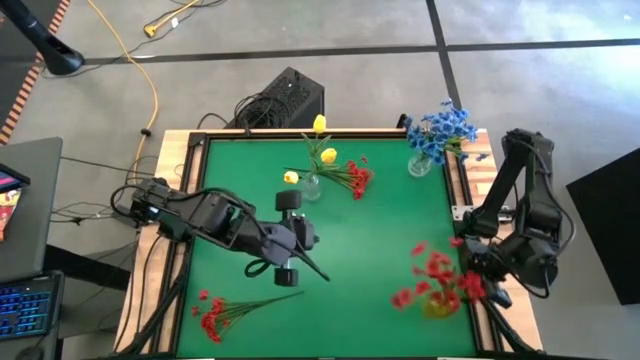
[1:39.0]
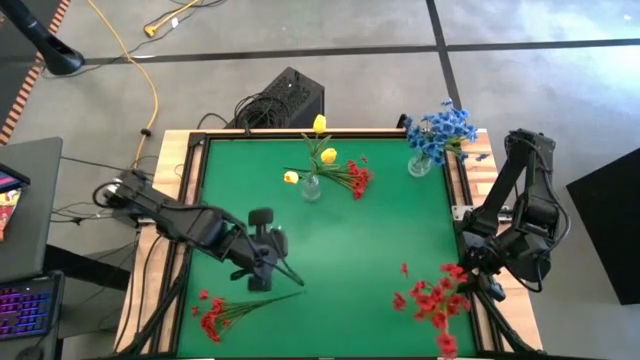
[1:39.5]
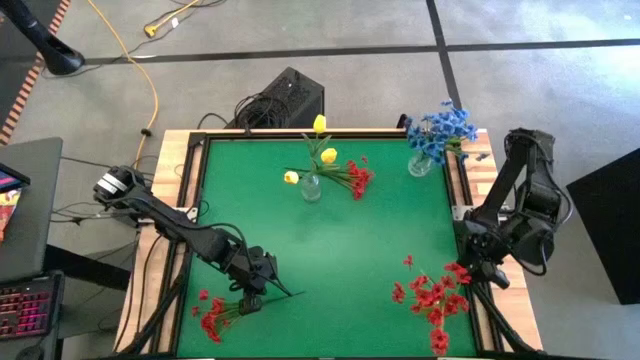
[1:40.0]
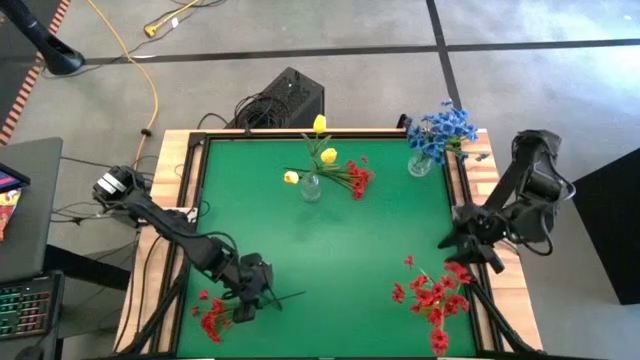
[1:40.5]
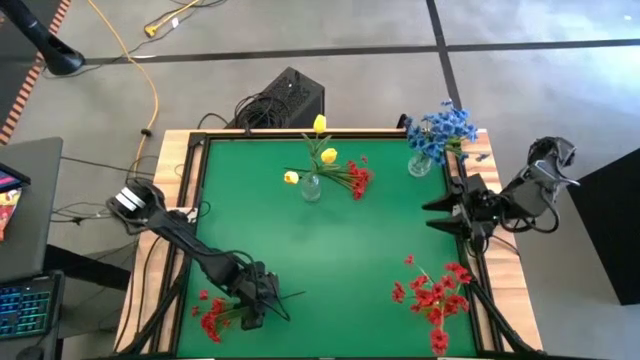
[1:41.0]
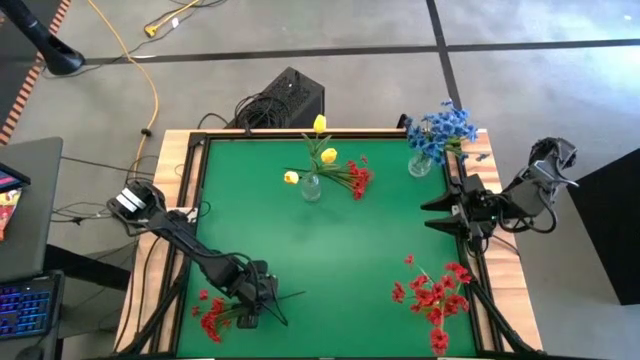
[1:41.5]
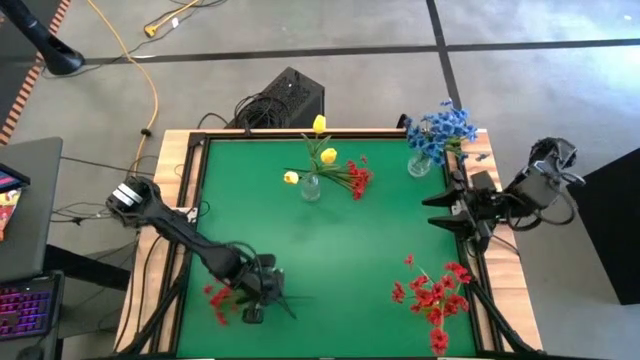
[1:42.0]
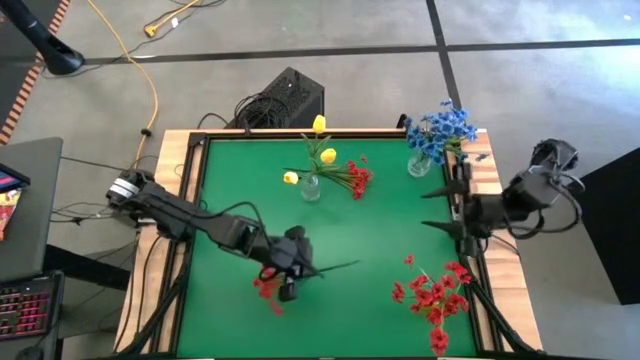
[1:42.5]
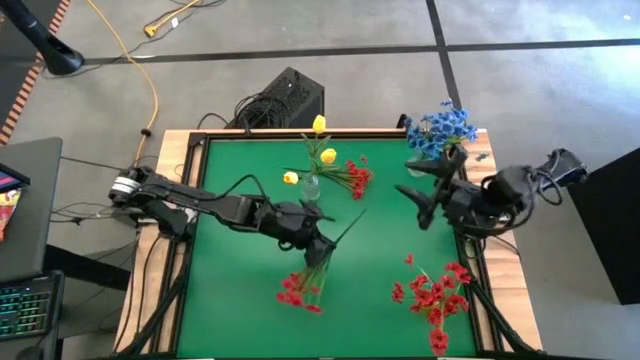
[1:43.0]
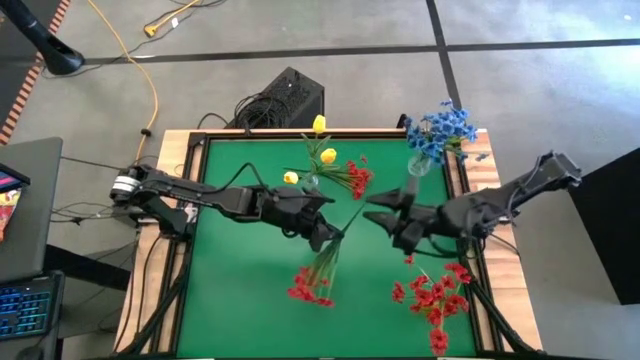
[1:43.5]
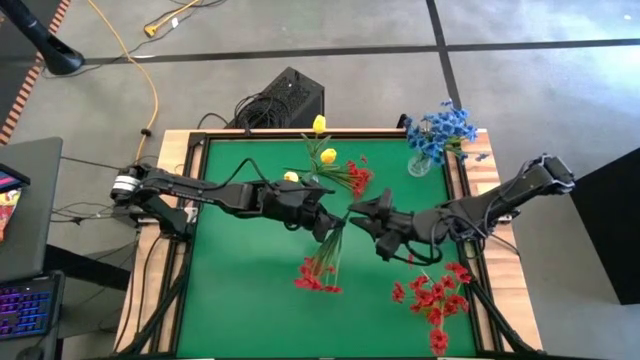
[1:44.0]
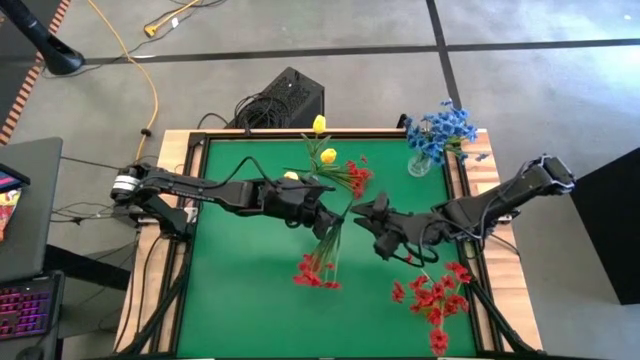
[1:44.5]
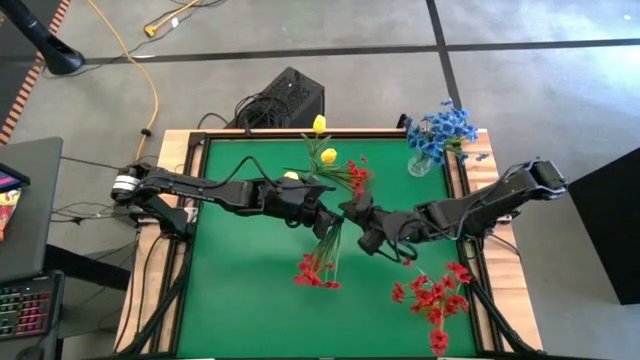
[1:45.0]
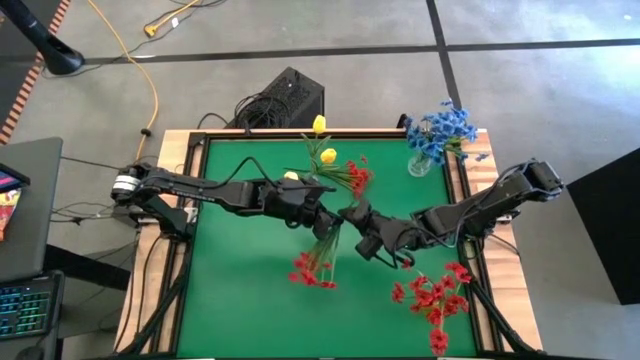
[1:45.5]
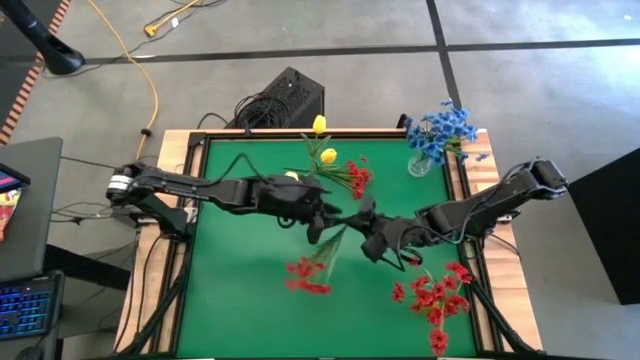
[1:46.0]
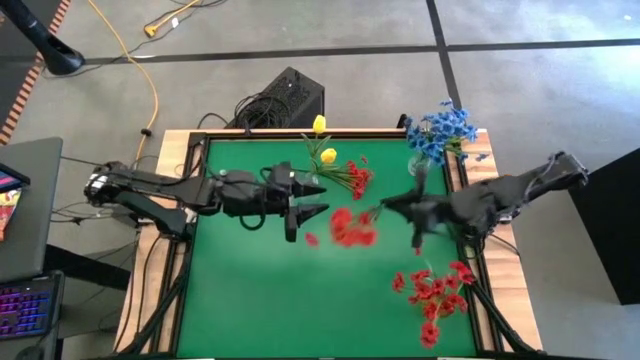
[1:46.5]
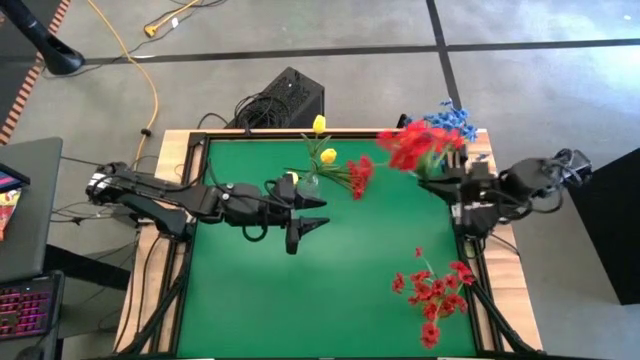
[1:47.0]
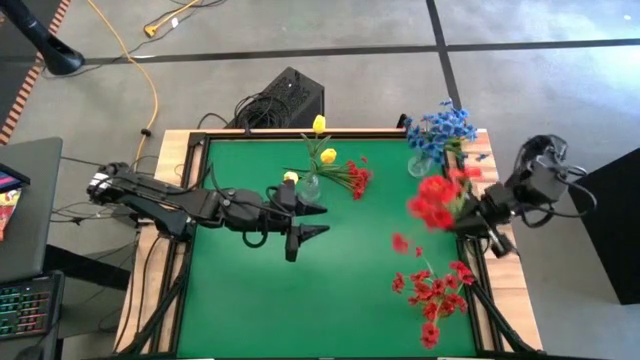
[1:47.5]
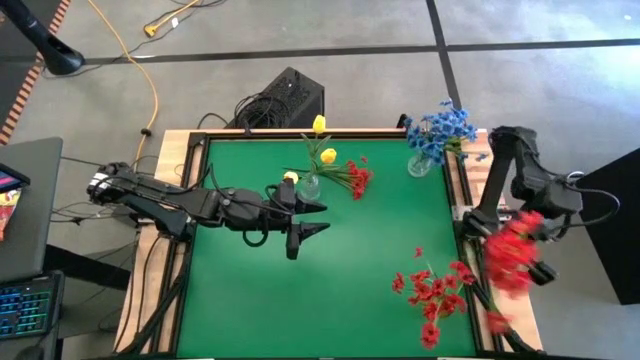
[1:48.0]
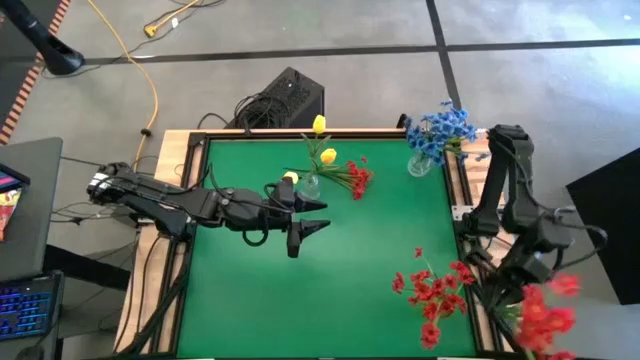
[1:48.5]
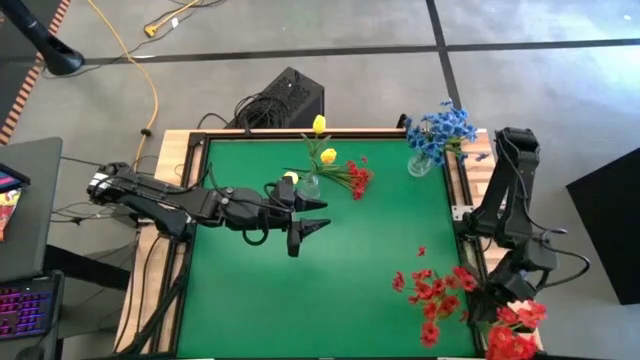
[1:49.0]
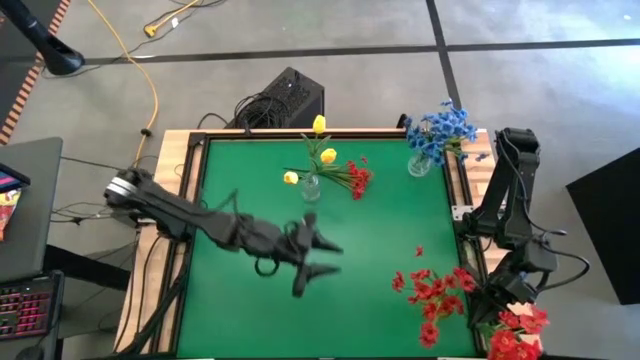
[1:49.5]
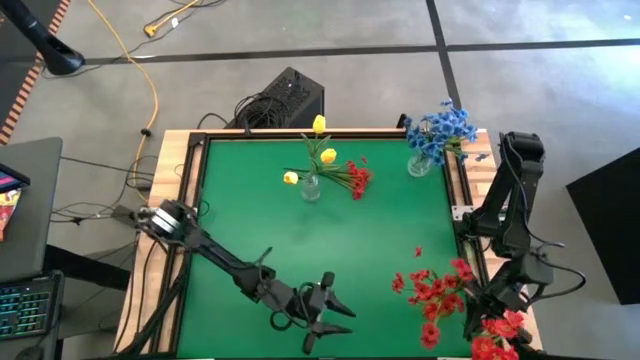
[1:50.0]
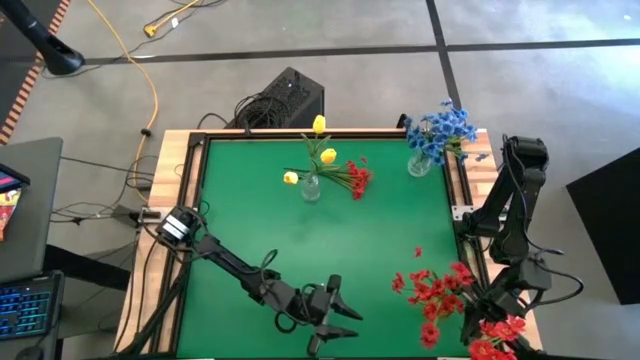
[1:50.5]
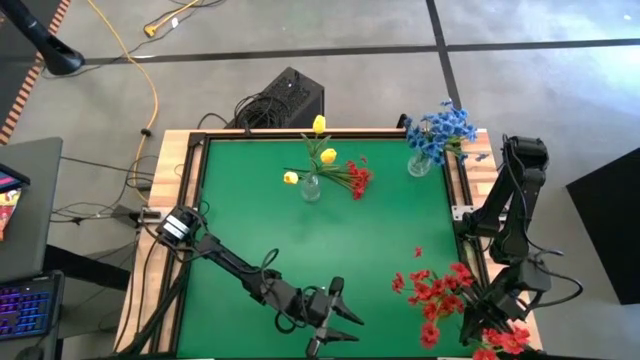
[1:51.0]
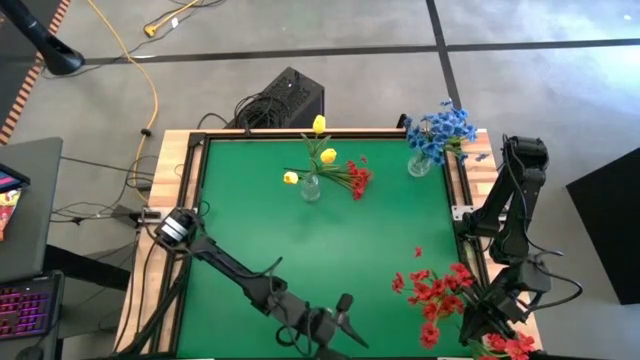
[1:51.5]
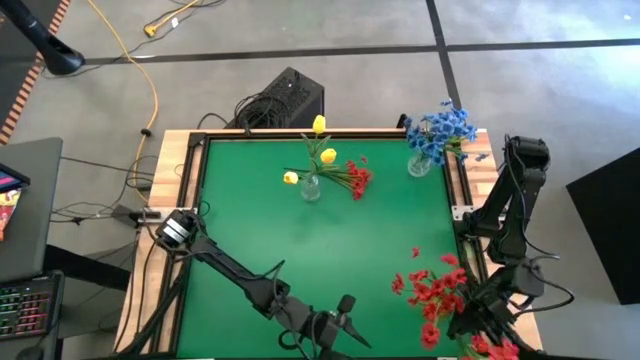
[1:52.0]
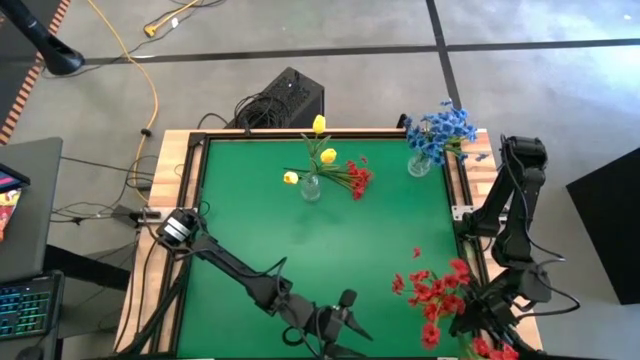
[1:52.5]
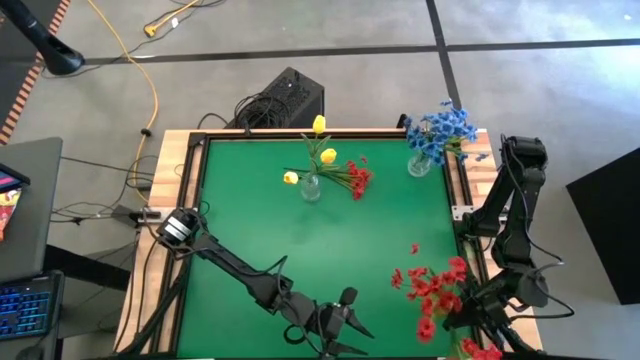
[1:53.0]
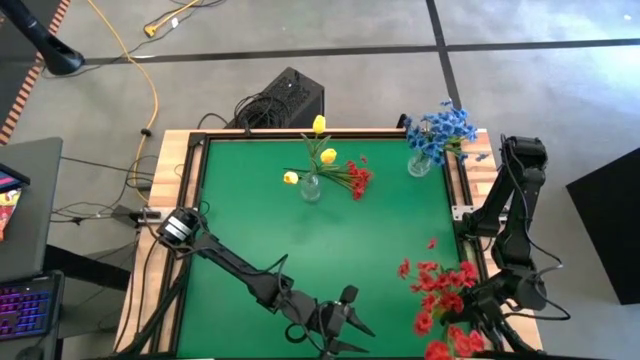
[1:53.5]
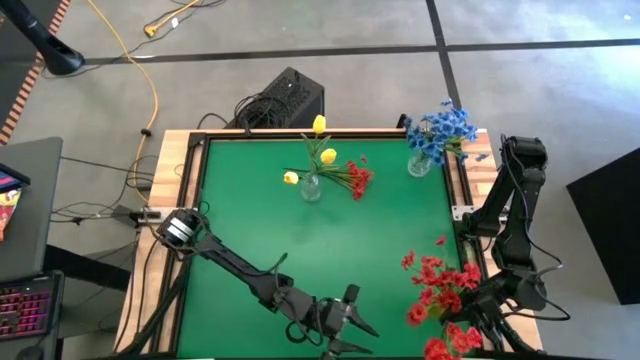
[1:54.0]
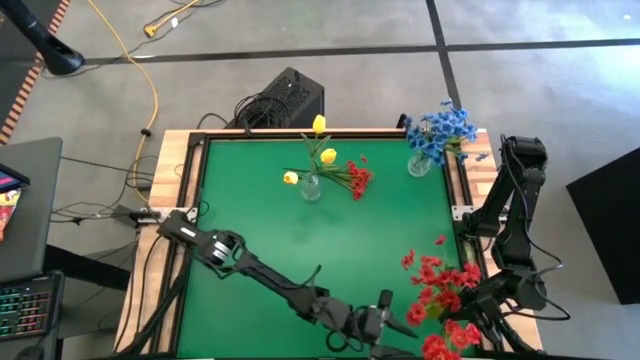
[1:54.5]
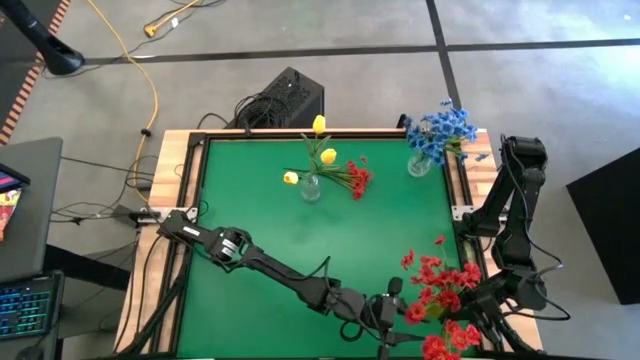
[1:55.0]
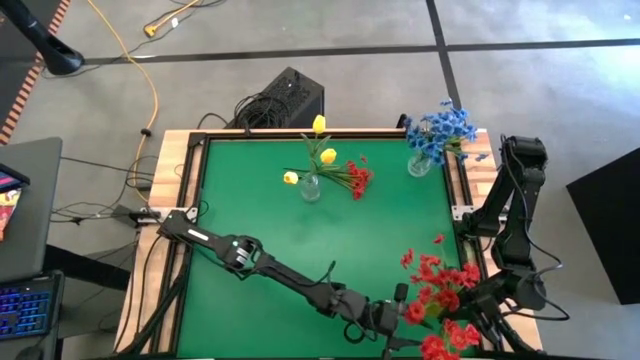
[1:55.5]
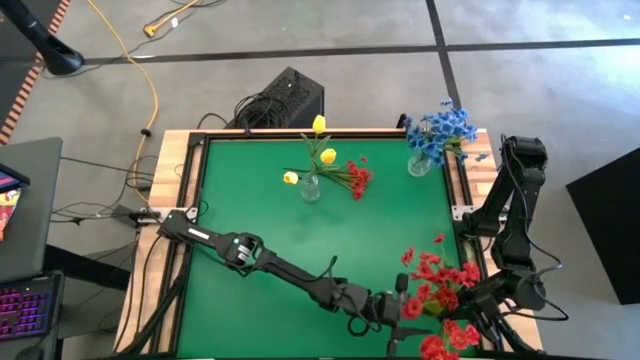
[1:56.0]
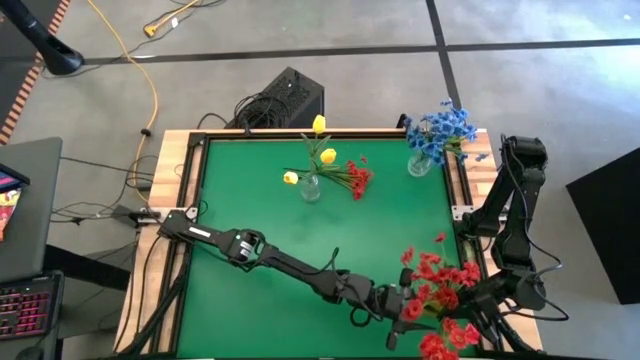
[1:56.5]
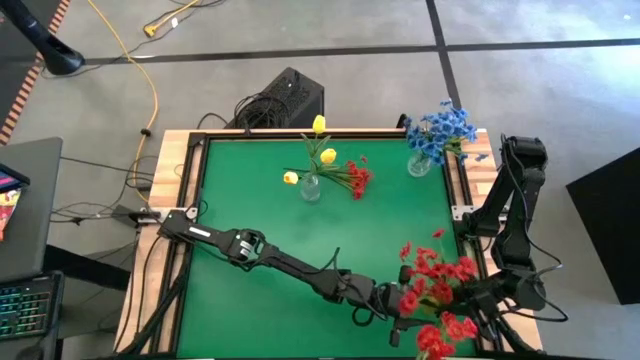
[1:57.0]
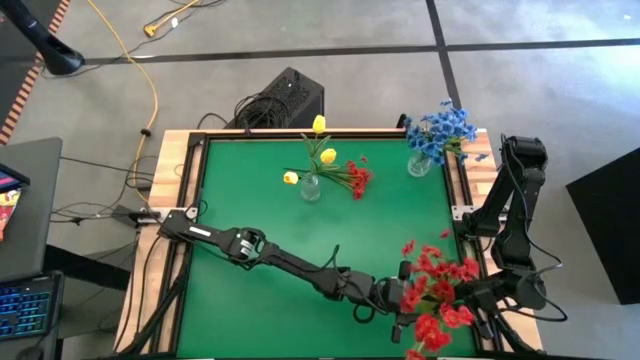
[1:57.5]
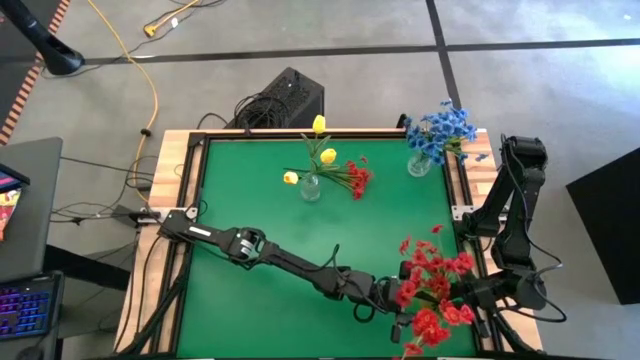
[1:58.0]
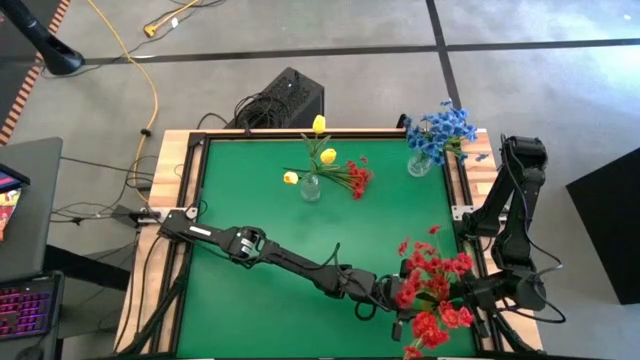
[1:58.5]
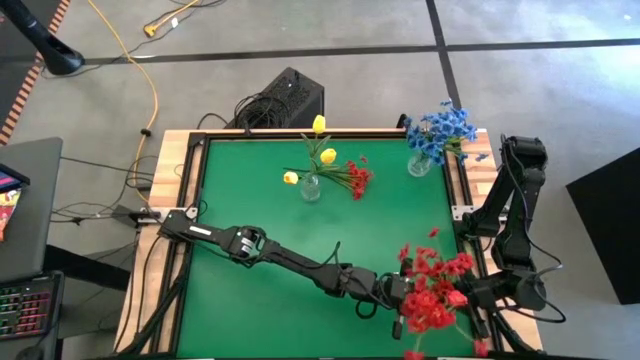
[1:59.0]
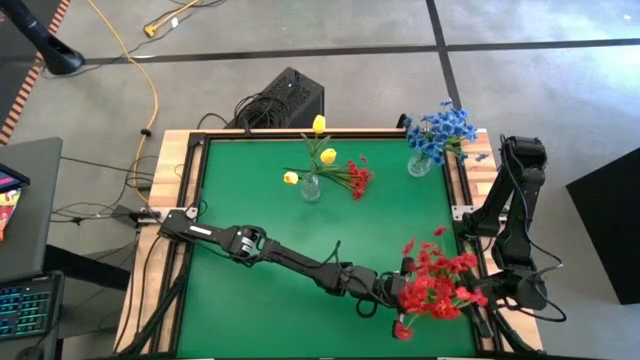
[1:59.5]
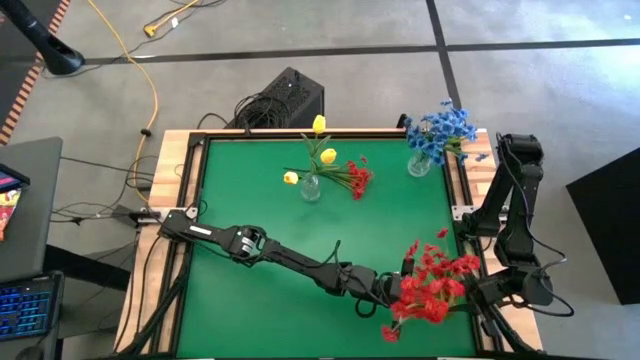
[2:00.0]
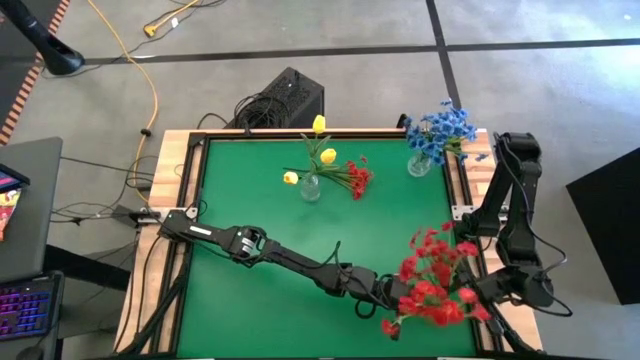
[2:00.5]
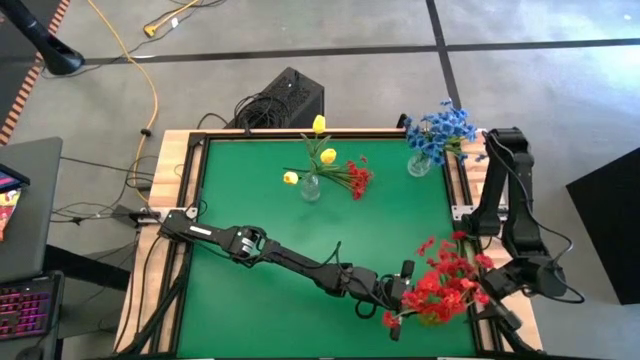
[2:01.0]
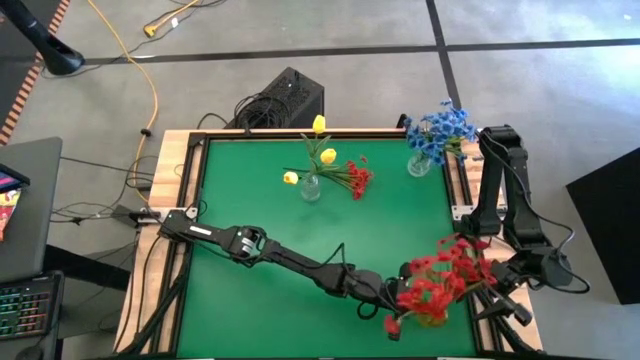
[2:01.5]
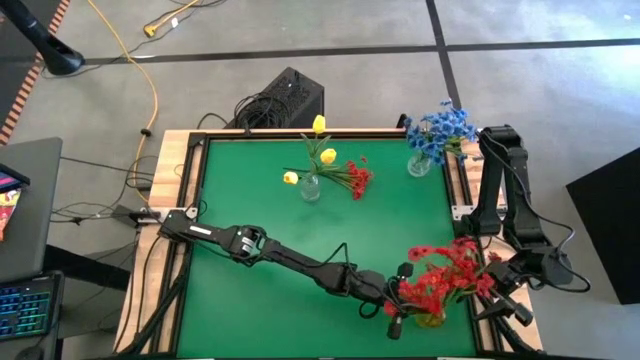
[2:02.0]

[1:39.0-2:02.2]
Task: Sort flowers into vase by color
Put the bottom red flowers into the yellow vase
